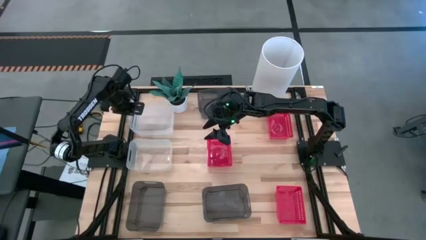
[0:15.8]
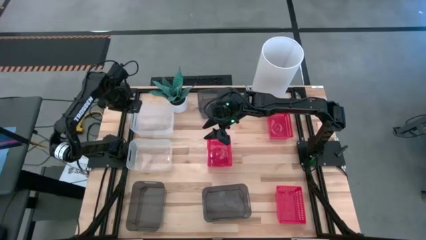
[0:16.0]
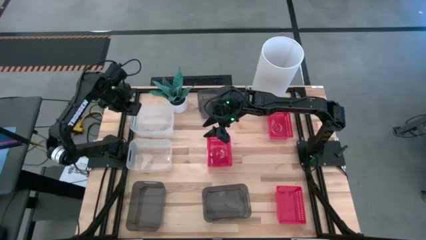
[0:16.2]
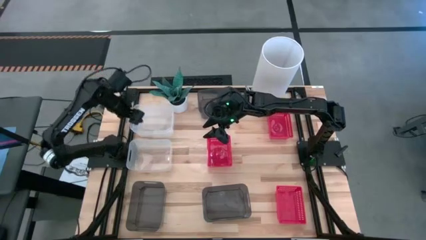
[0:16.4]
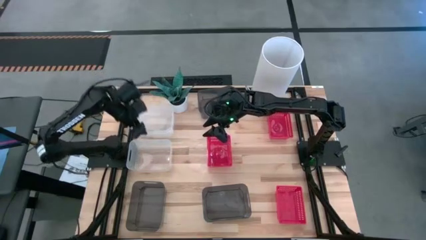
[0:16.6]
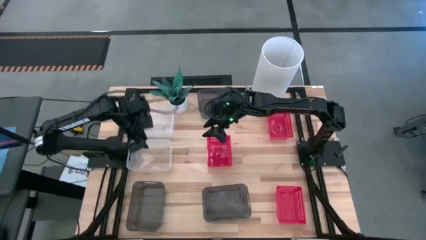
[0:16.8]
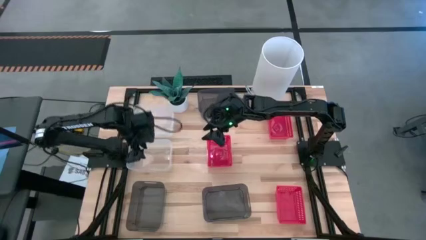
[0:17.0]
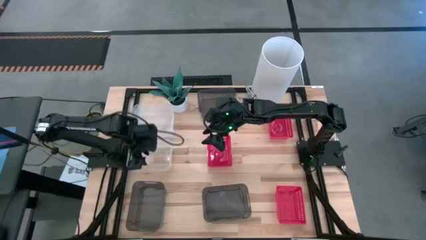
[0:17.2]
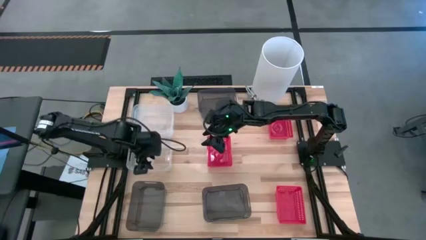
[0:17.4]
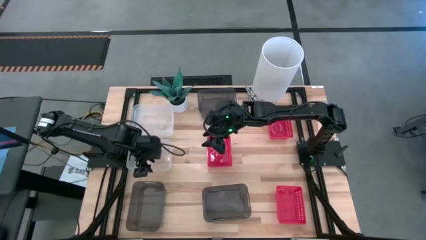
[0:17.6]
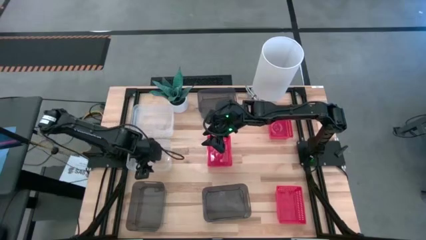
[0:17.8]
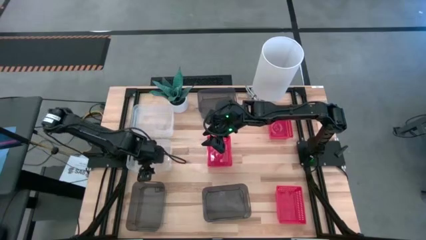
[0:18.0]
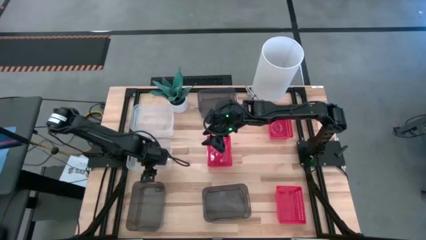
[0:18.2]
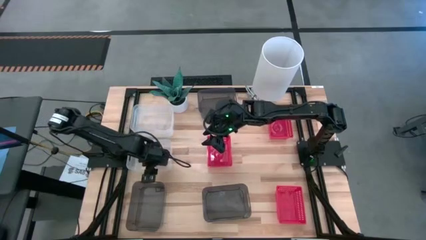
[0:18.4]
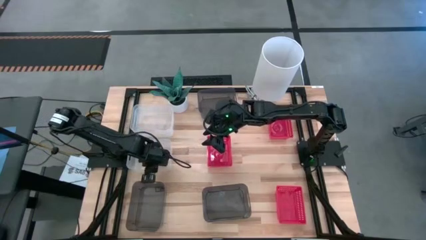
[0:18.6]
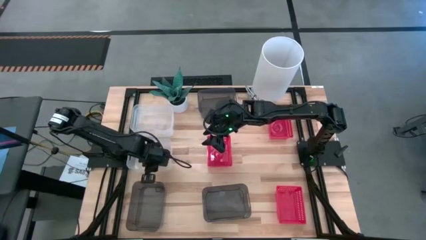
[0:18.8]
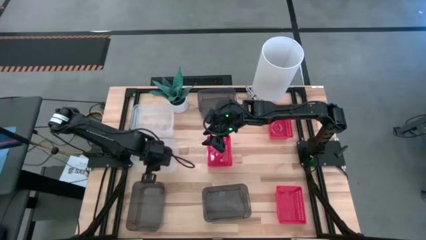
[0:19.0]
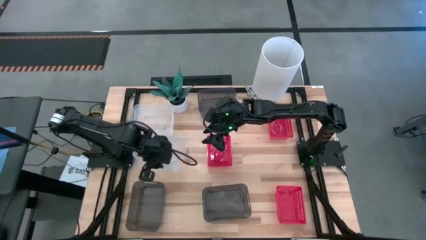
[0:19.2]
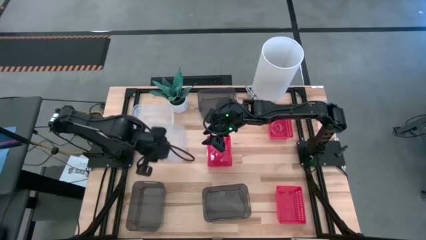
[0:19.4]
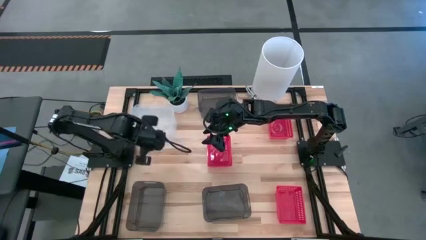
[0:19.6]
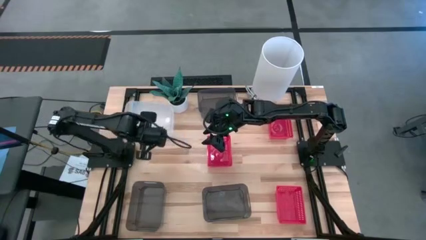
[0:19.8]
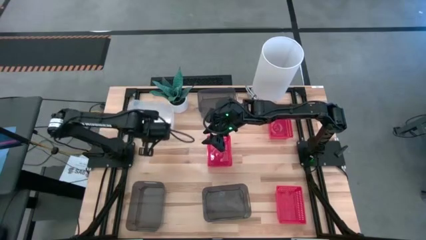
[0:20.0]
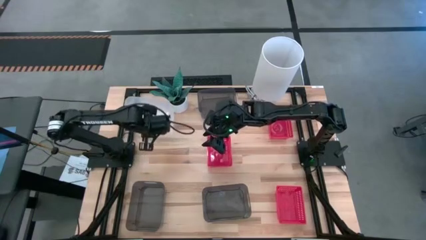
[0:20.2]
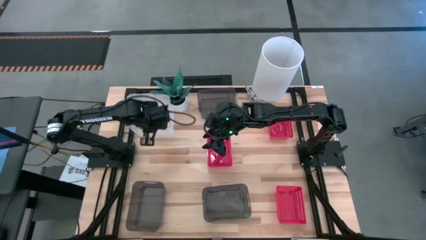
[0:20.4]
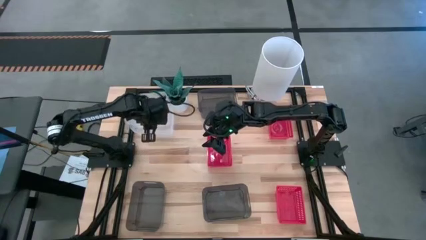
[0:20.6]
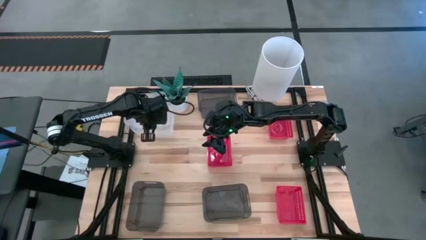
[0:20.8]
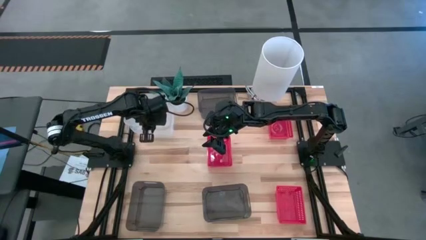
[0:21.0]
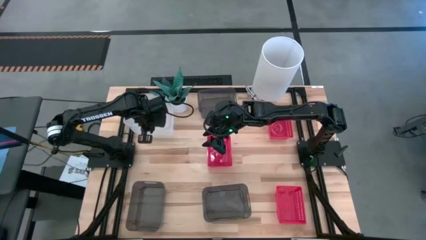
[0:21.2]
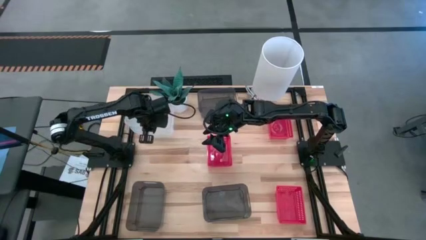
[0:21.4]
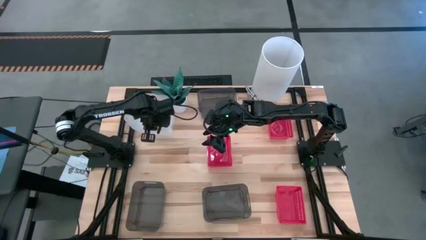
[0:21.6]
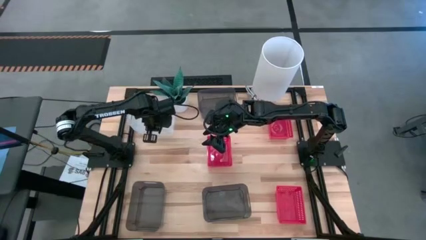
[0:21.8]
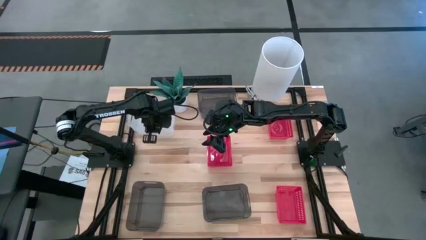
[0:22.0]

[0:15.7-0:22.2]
Stack the bottom transparent bin on the top transparent bin

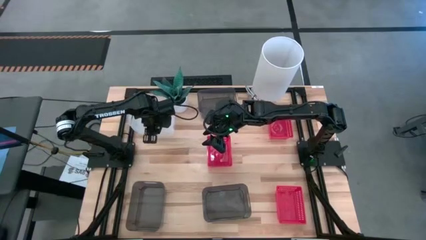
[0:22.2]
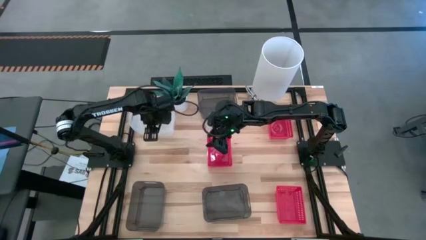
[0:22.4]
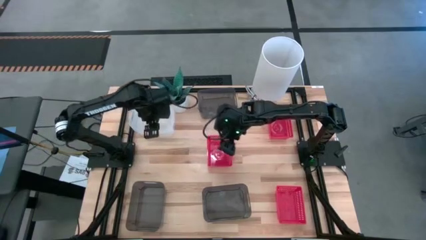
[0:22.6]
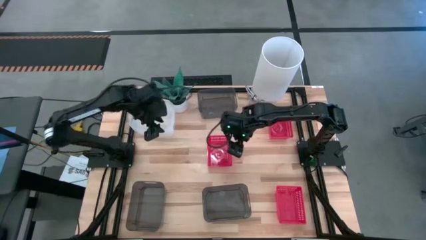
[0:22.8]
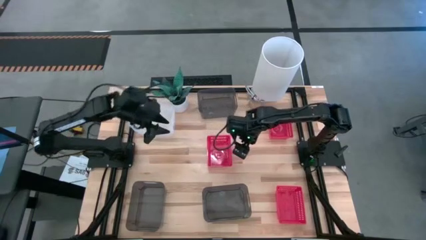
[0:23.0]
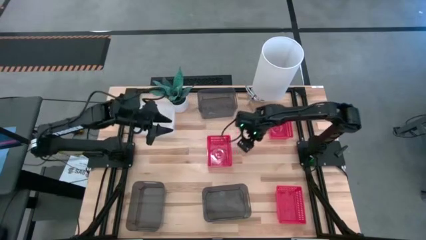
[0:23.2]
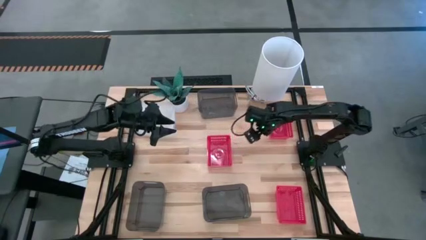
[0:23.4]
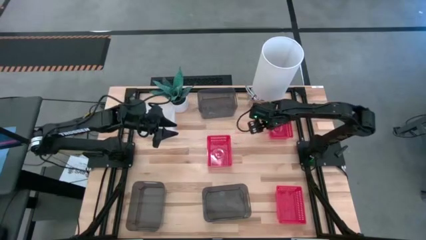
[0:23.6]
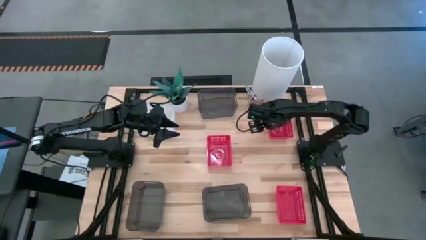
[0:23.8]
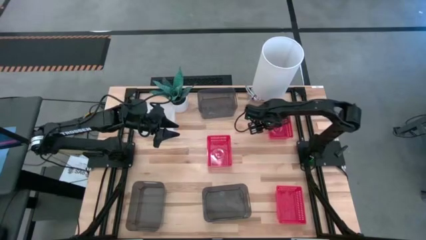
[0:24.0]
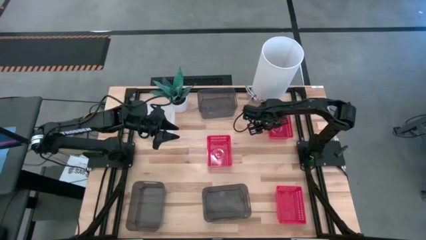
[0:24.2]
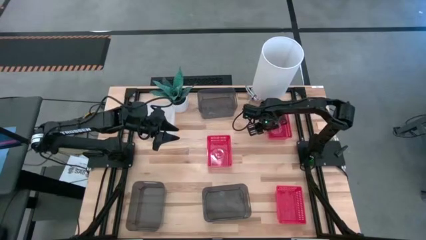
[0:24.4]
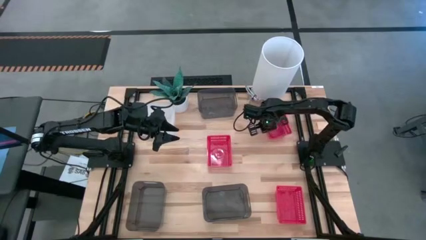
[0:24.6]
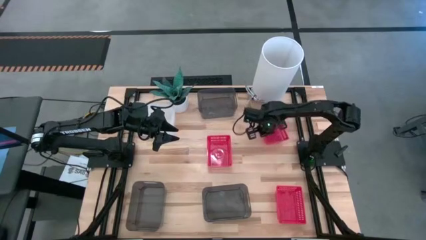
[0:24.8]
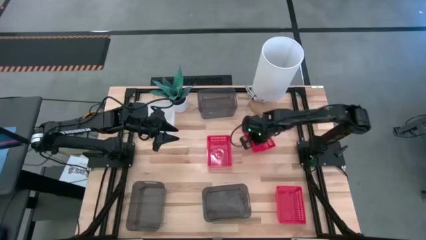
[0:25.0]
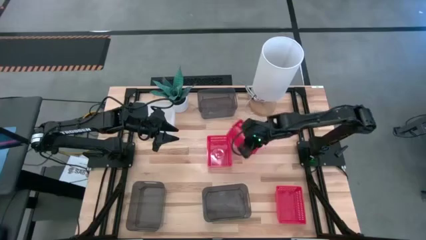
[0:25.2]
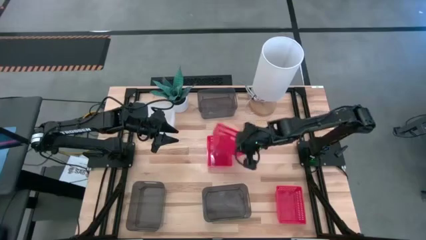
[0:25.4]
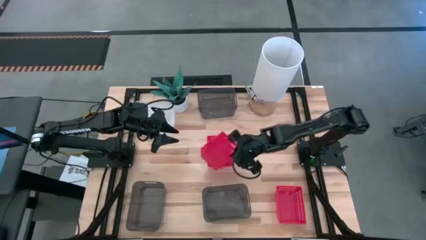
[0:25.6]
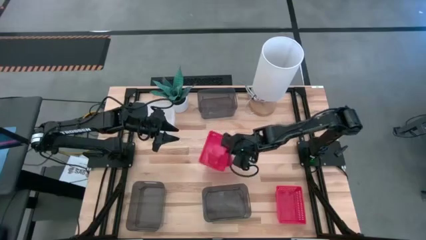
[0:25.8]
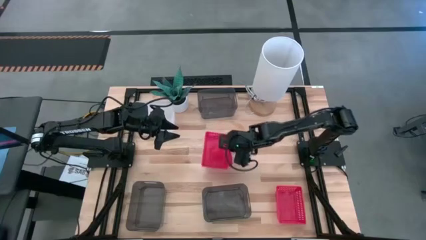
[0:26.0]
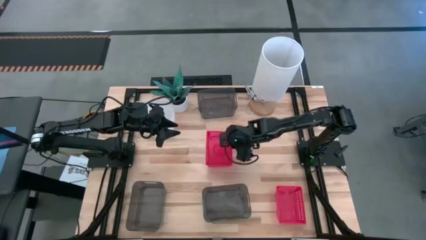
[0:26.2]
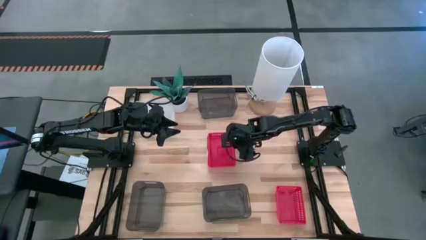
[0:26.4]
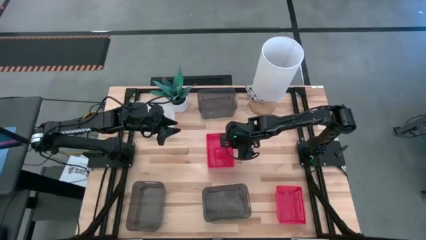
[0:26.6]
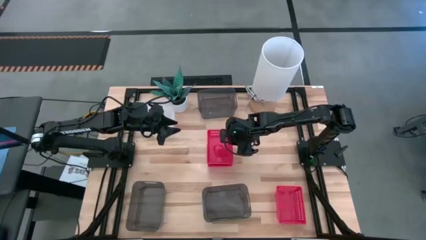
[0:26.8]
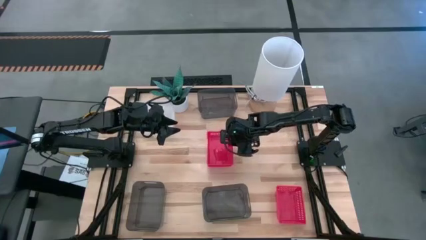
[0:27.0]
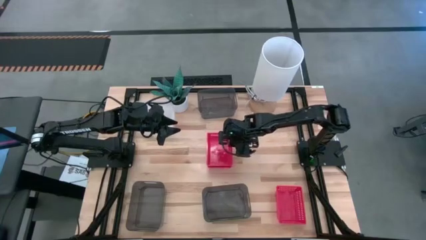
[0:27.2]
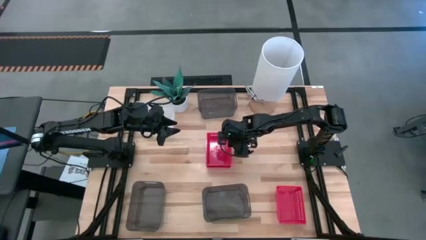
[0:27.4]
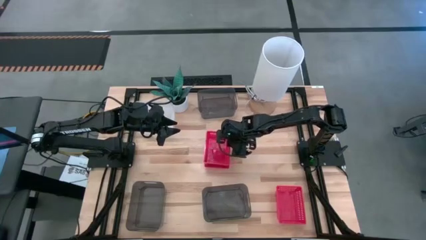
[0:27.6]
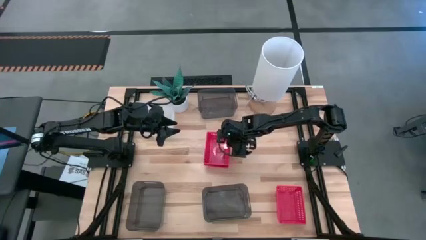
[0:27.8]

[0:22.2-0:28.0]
Stack the top right red bin on the middle red bin

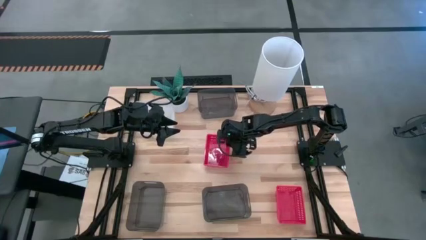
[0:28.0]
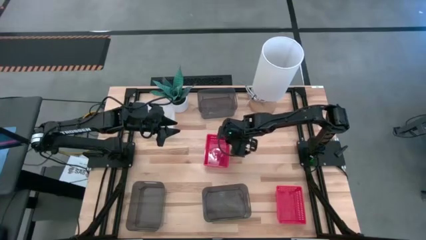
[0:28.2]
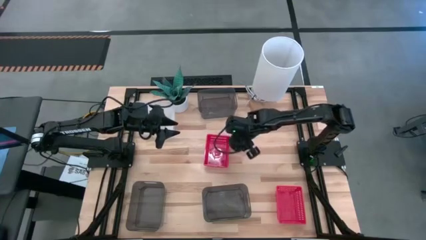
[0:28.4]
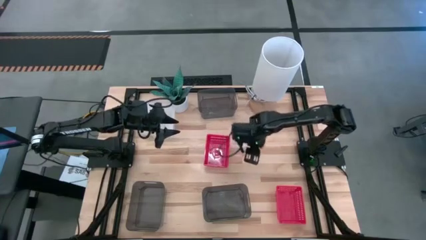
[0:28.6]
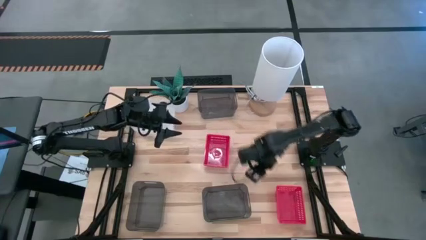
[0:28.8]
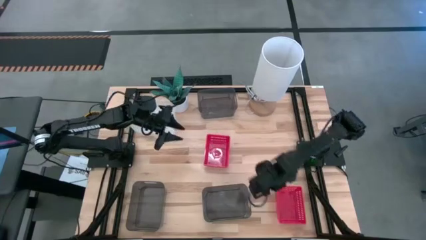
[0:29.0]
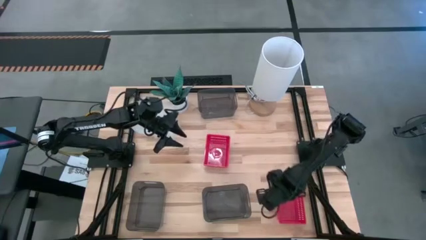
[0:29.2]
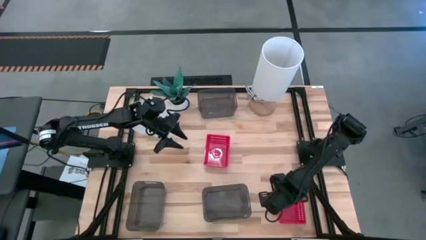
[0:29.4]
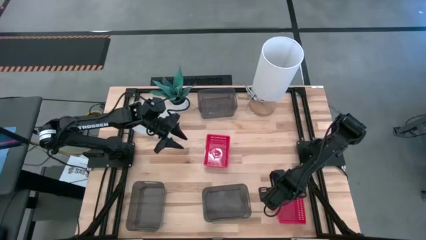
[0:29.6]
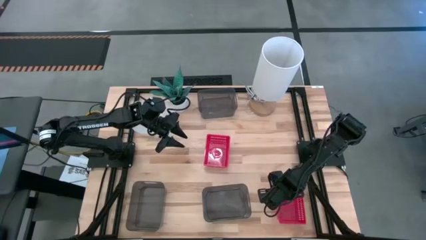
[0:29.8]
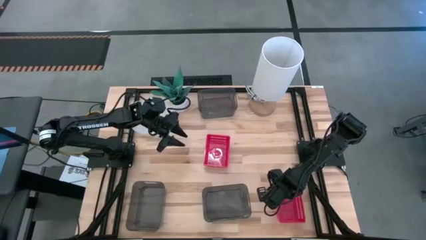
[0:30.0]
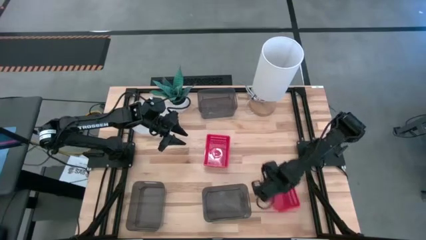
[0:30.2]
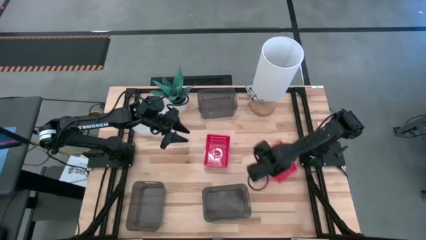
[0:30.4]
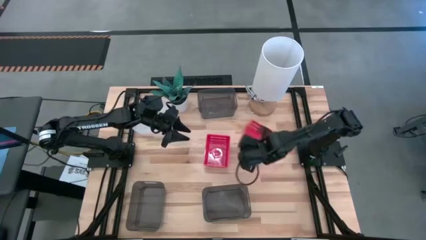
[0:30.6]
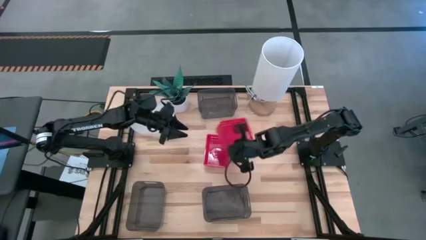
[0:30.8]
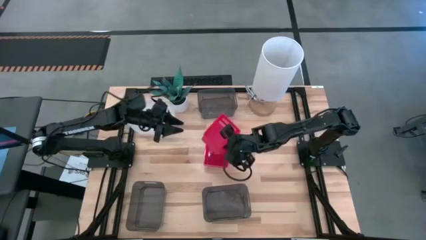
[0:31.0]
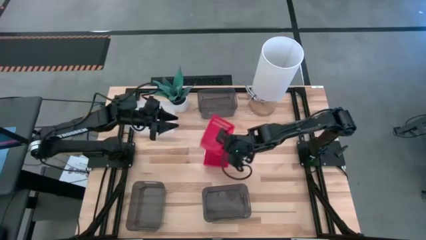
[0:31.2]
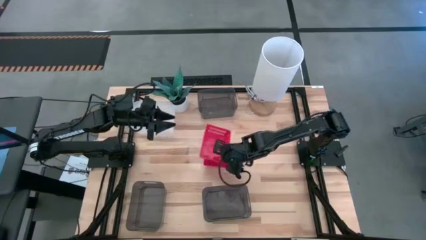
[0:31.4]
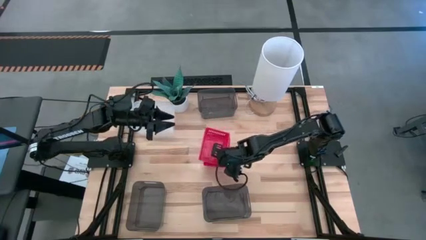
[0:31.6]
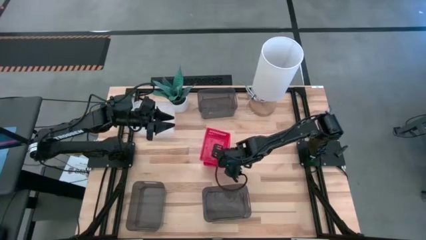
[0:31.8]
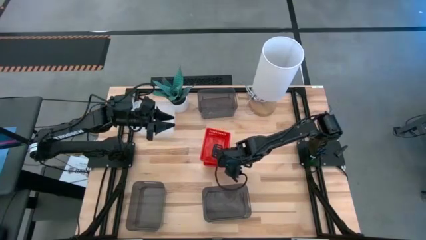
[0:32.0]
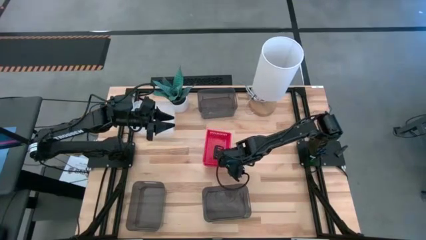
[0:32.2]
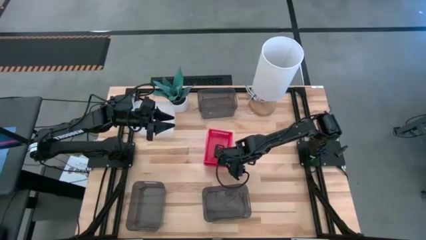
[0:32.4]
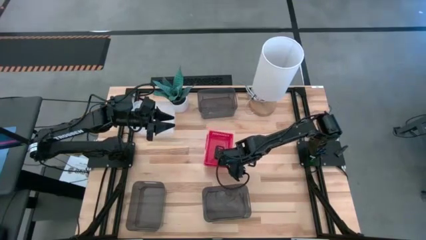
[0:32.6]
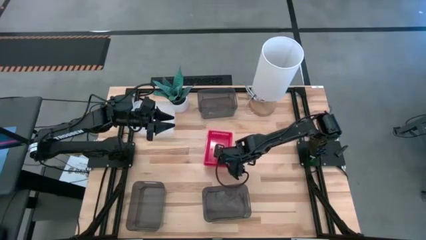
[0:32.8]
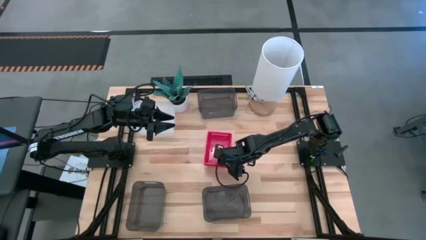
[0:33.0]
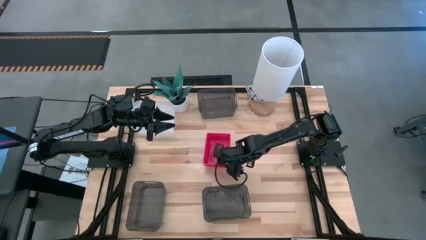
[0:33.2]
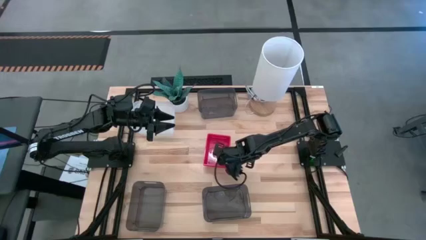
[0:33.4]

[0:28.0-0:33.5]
Stack the bottom red bin on the top red bin
